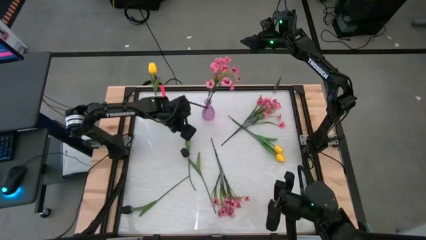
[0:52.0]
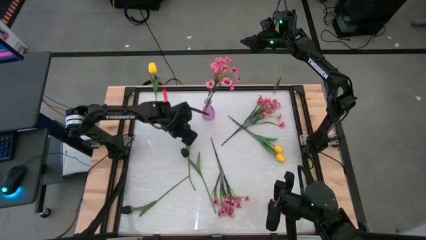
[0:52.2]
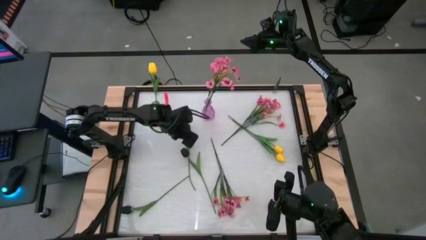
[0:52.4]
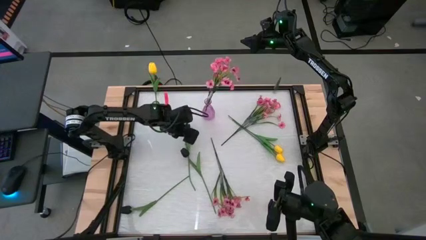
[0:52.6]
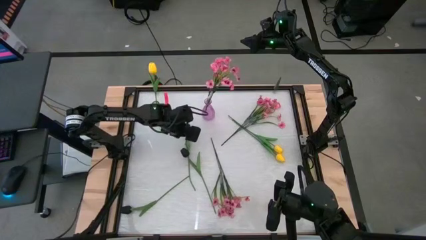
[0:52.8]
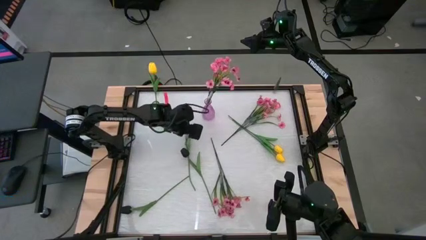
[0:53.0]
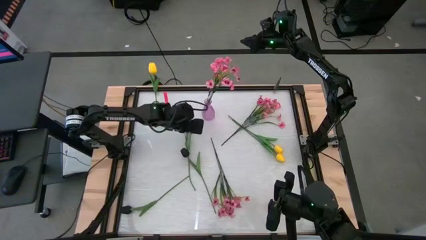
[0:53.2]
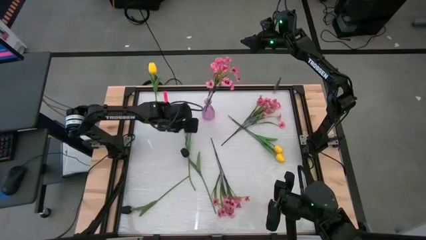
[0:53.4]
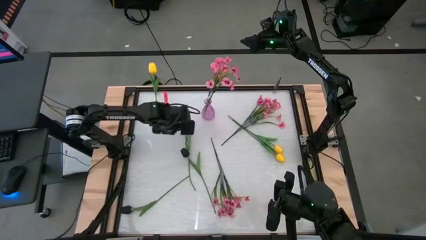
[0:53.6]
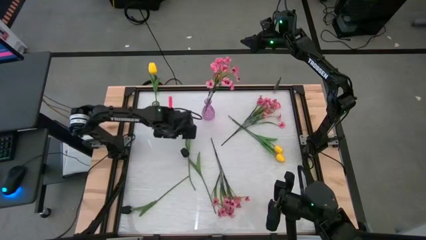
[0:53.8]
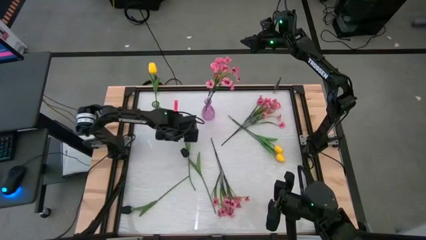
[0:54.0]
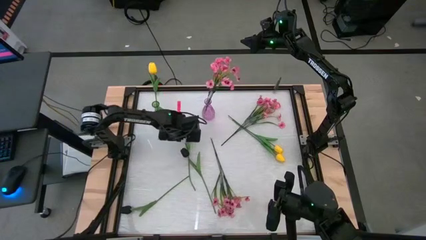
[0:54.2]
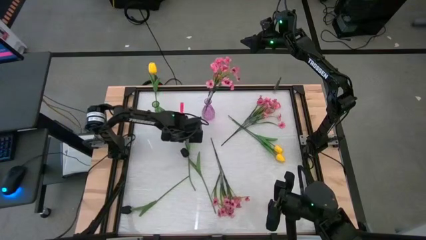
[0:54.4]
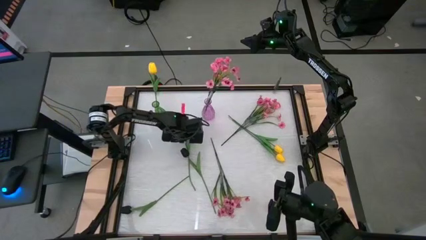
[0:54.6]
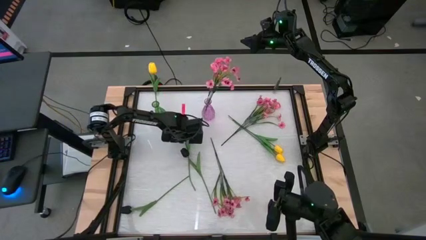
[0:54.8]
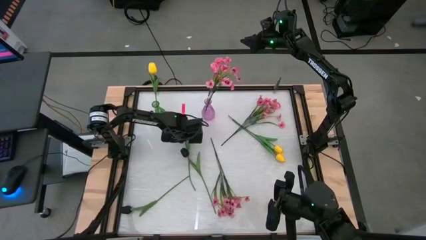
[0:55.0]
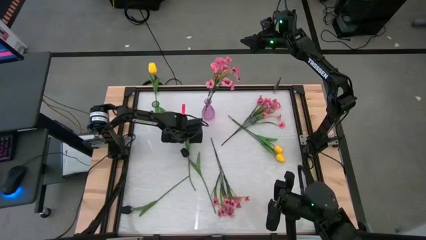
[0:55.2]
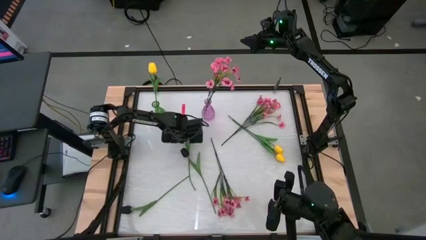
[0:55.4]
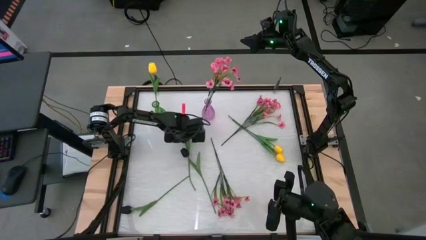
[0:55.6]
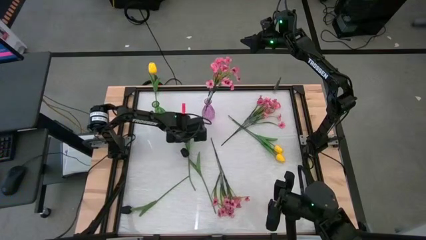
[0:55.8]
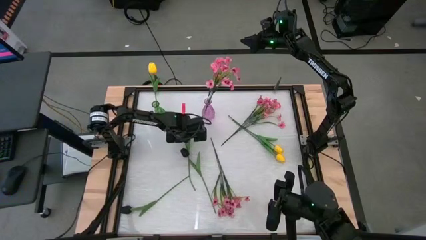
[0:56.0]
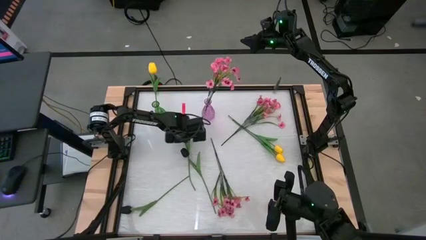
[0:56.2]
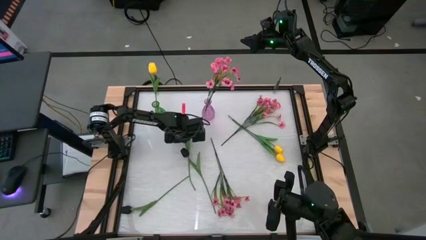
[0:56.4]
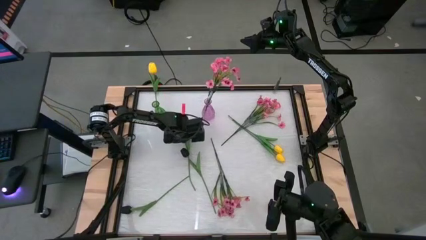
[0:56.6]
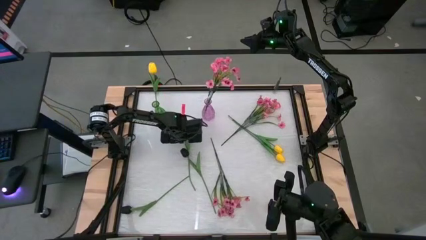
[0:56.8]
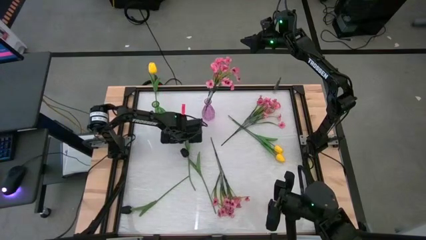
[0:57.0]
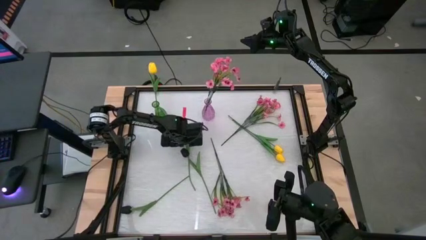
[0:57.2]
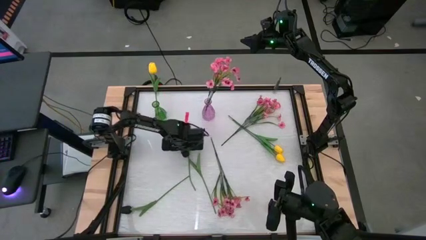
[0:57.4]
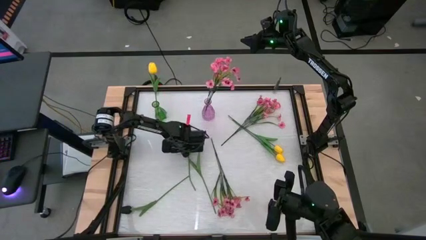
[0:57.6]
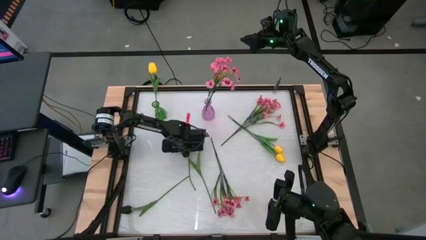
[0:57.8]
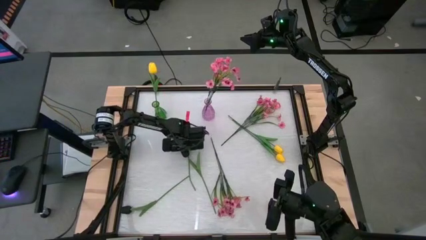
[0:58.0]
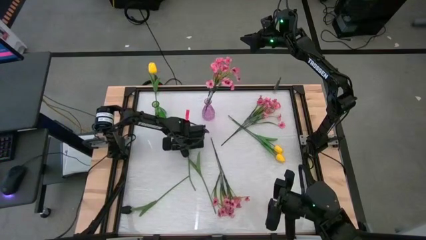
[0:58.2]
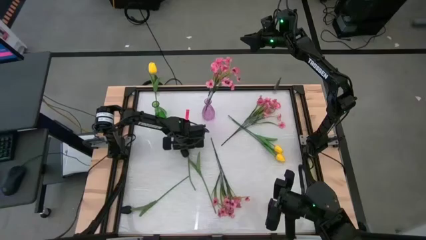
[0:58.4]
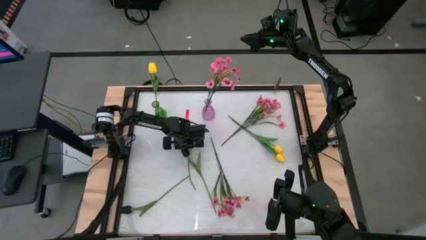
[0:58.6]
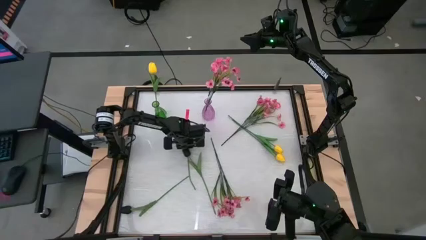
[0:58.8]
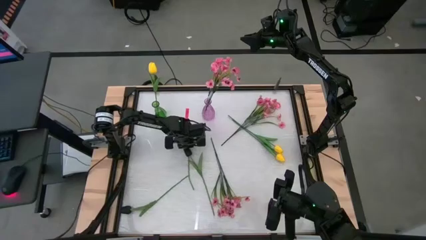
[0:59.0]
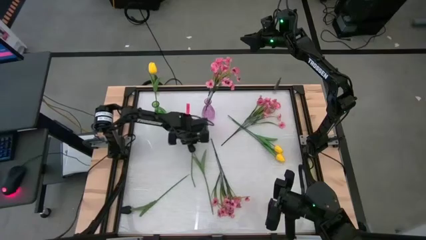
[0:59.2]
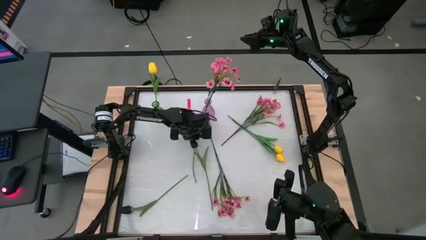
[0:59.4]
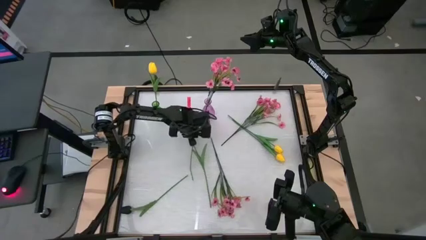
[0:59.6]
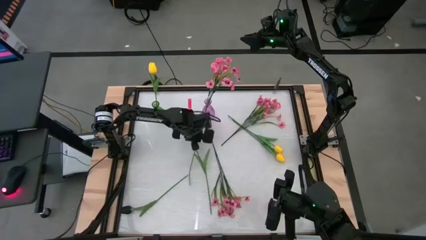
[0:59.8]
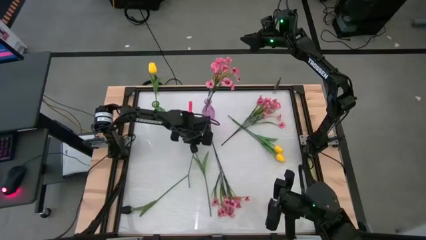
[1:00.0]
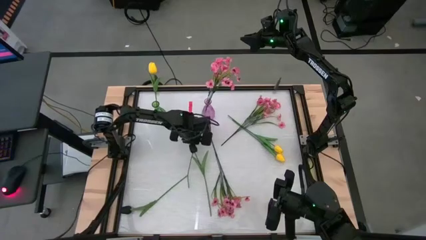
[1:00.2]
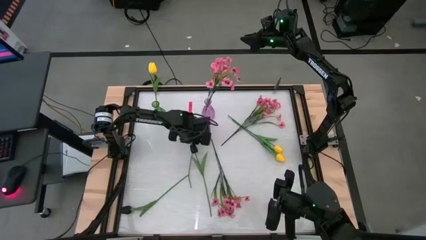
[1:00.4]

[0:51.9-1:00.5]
Task: Sort flowers into vase by color
Put the top black flower into the red vase

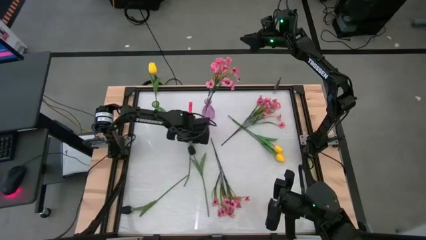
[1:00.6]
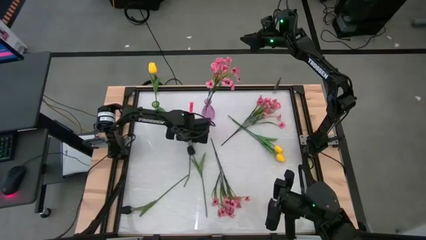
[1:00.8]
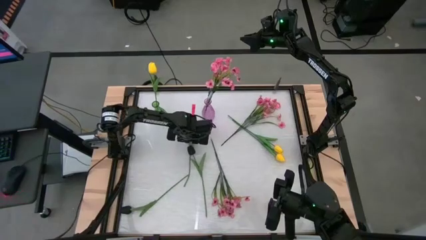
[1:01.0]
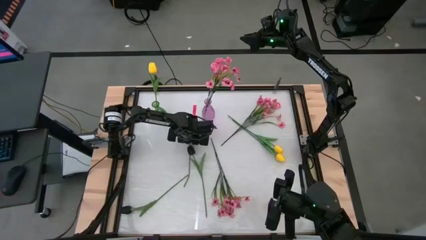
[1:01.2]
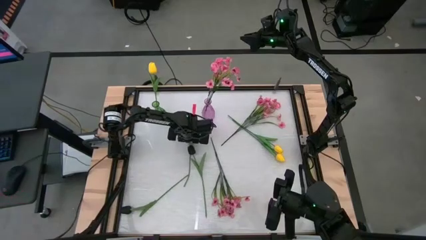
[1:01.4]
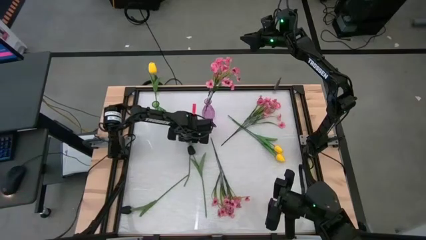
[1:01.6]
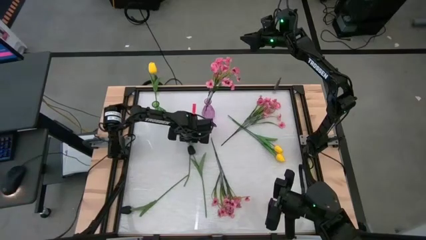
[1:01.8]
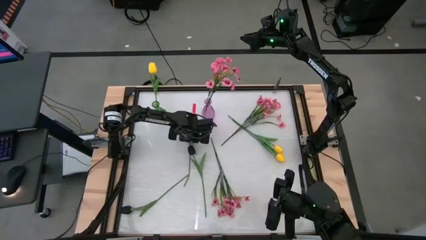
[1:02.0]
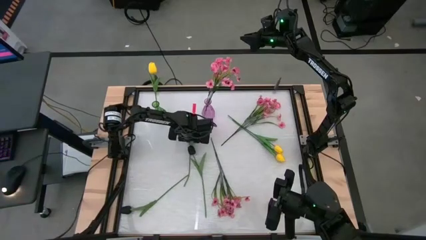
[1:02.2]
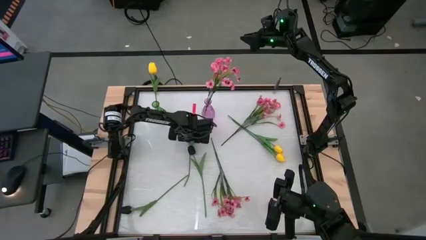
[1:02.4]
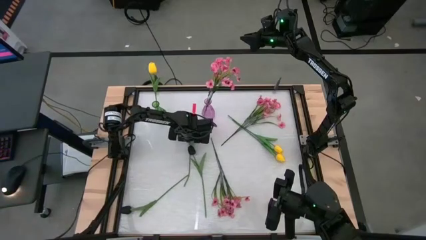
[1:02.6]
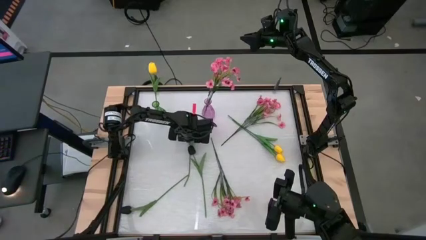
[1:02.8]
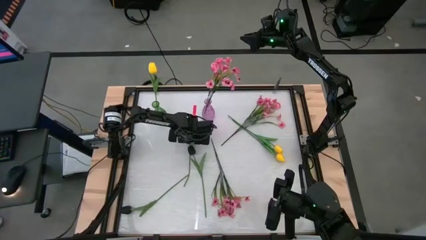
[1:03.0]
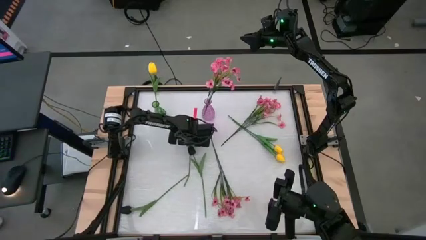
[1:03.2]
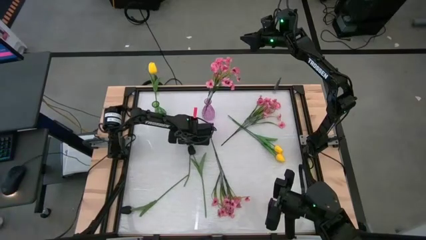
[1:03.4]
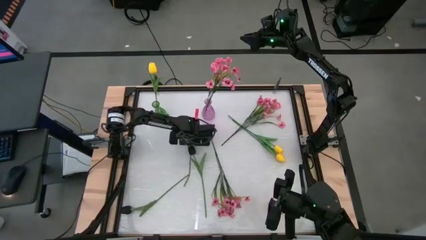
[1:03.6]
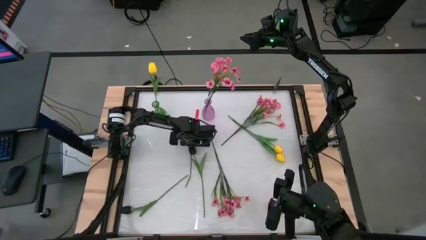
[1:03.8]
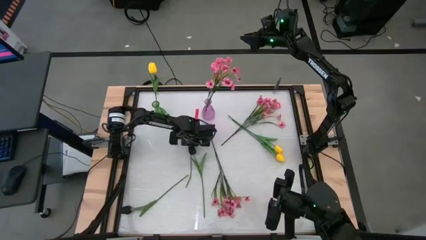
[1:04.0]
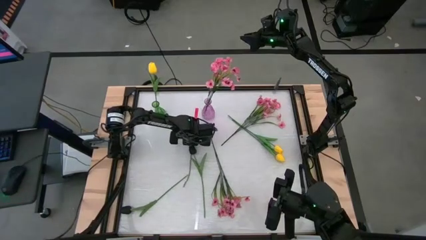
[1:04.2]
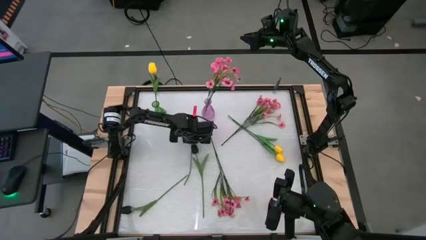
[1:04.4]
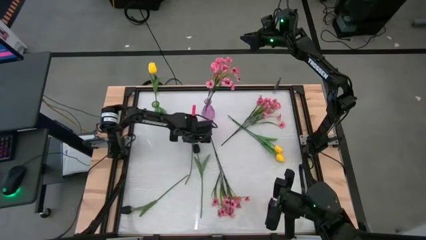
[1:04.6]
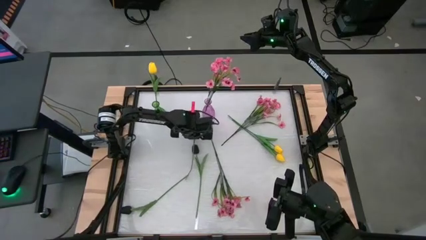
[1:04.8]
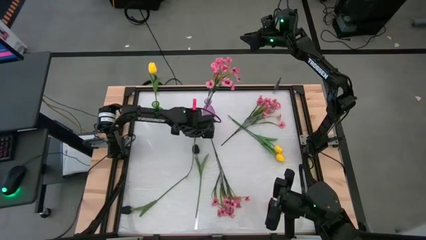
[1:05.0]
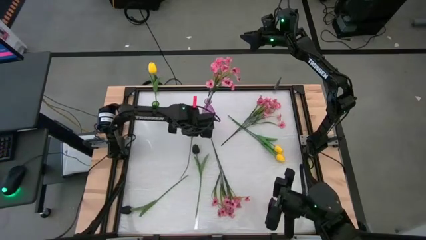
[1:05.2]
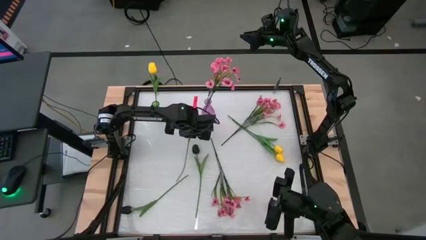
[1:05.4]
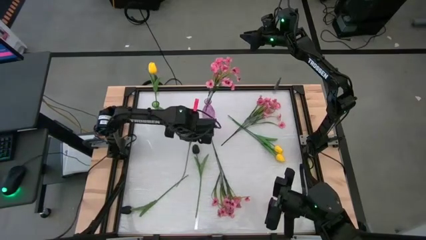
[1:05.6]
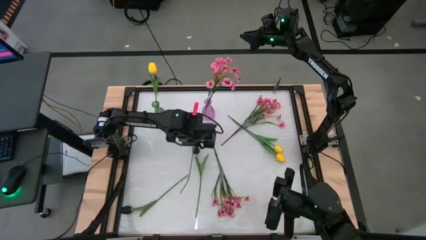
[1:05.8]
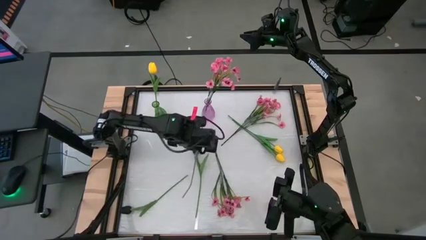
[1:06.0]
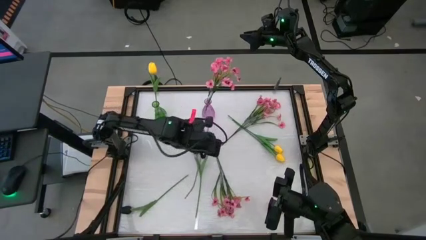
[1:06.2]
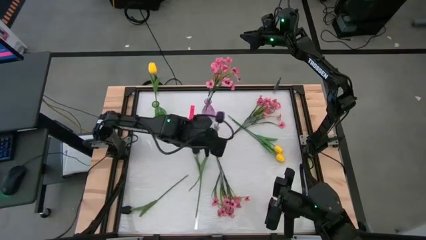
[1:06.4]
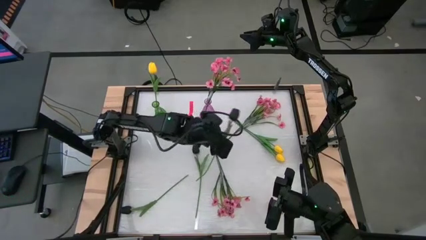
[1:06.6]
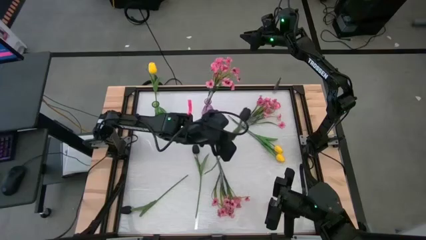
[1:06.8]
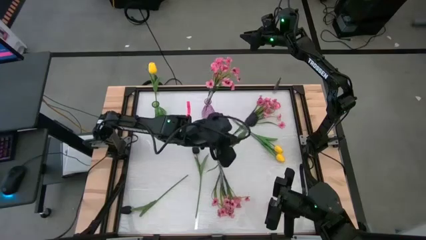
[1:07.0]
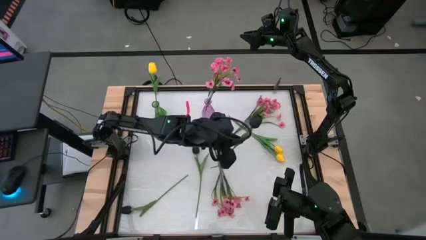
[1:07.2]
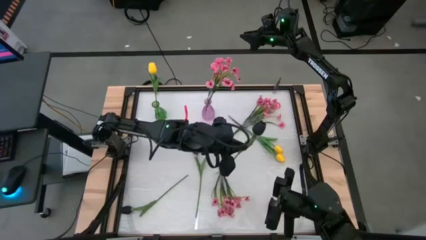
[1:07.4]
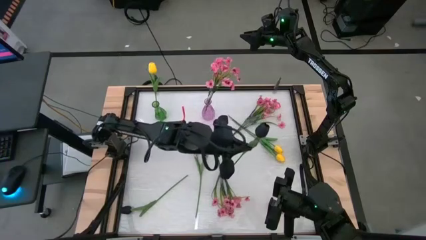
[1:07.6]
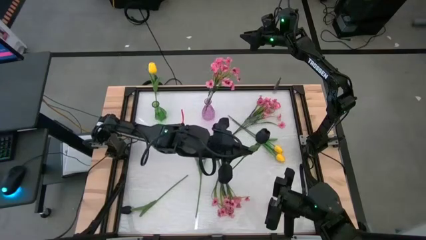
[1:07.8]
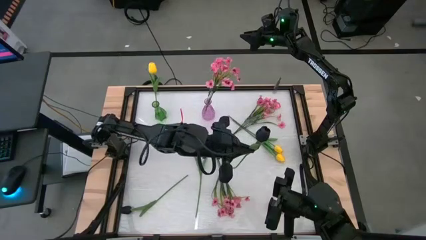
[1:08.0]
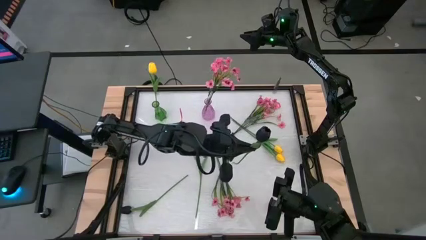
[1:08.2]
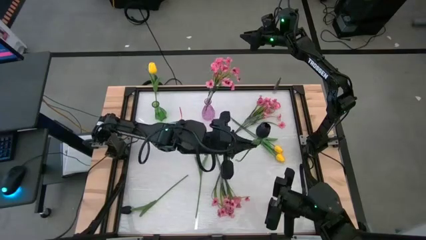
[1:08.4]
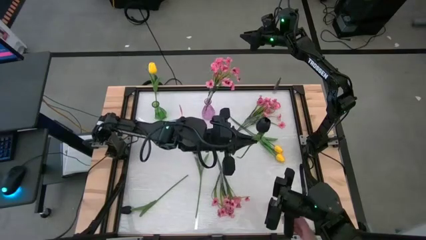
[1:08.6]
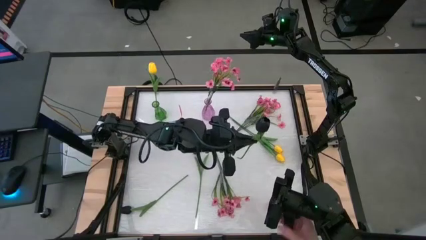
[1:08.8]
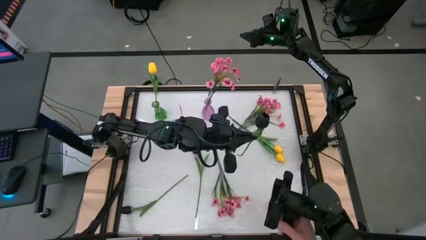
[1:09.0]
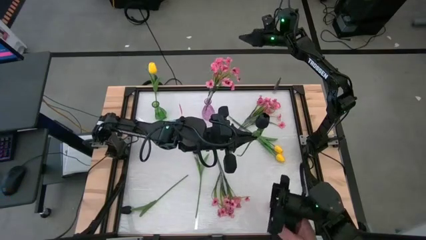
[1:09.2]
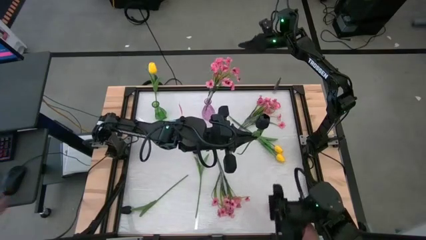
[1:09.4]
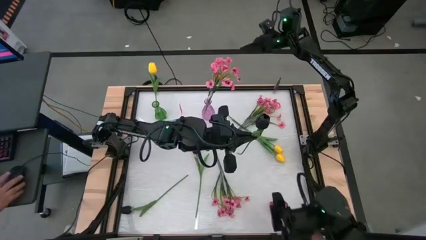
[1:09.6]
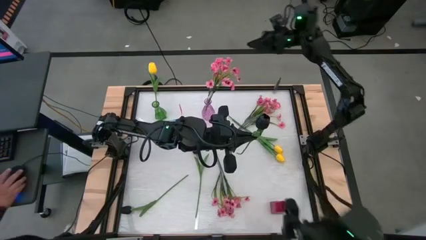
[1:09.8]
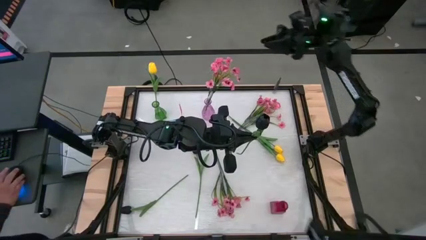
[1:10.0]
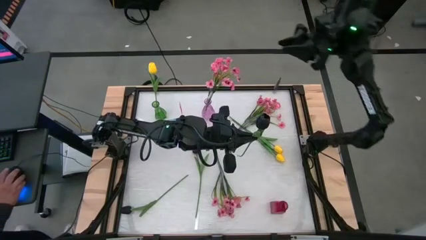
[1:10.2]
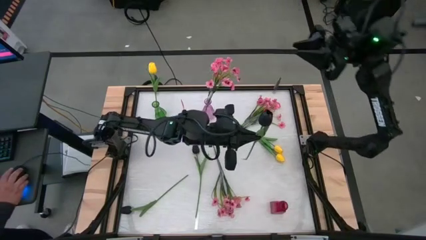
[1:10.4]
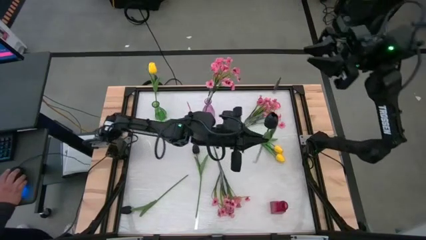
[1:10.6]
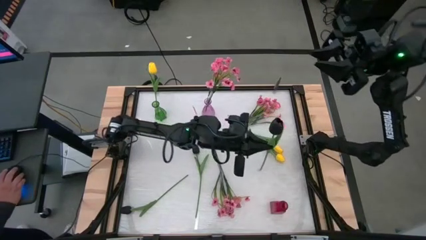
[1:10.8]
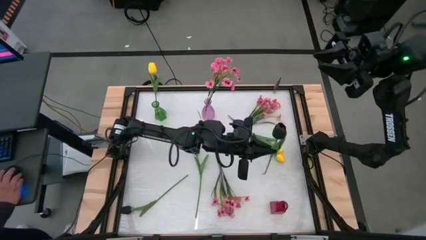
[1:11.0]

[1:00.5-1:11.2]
Put the top black flower into the red vase
